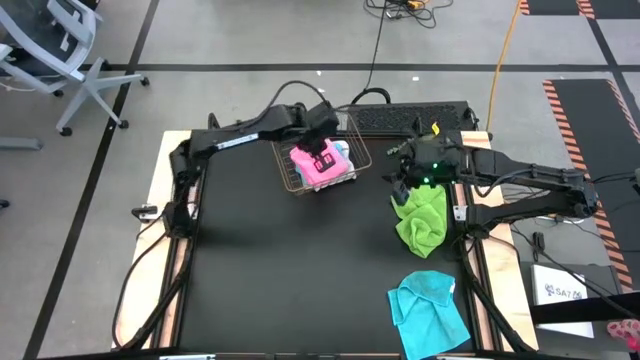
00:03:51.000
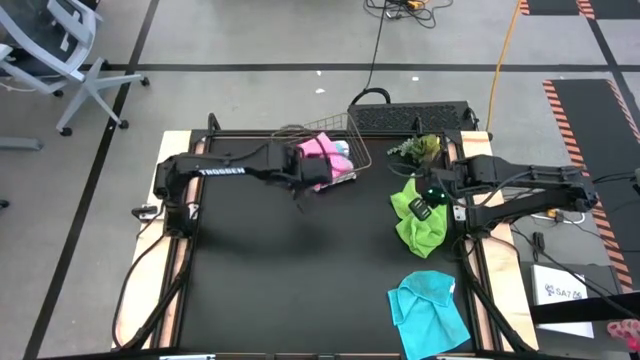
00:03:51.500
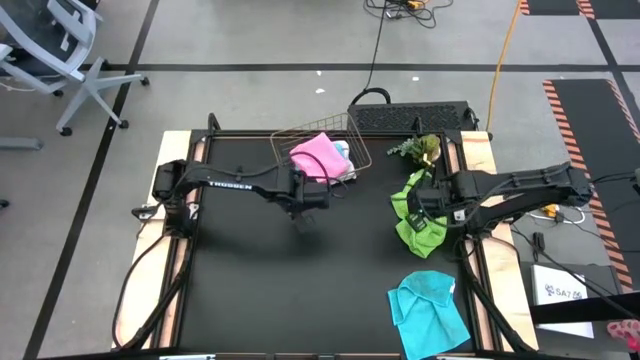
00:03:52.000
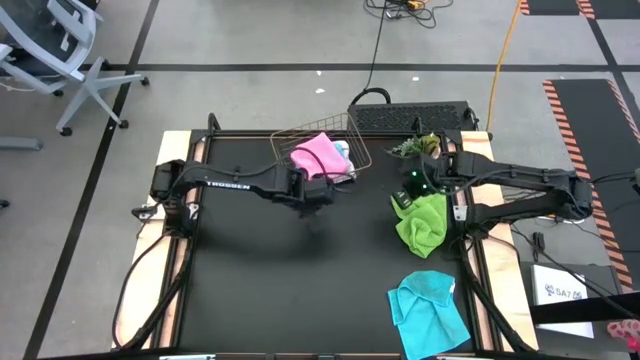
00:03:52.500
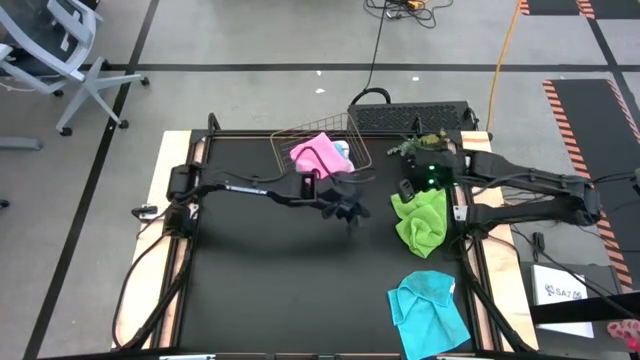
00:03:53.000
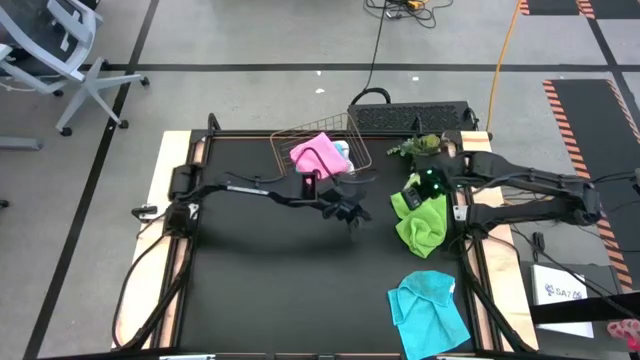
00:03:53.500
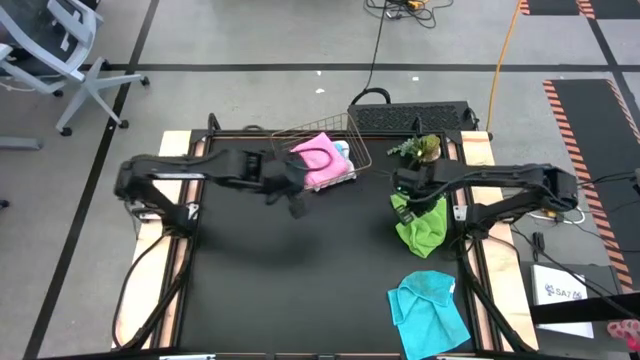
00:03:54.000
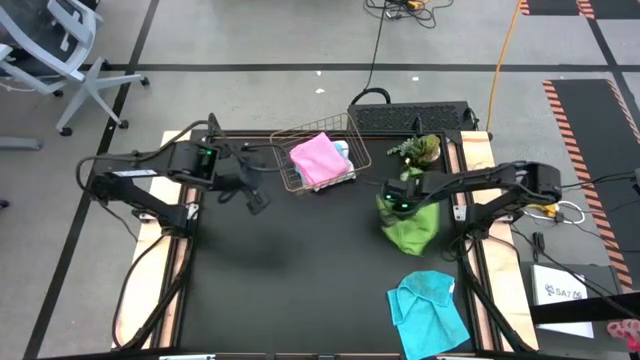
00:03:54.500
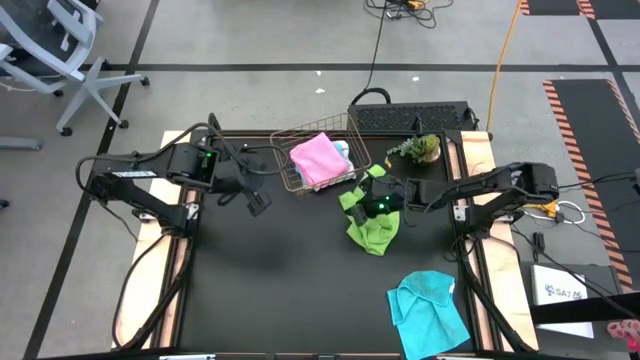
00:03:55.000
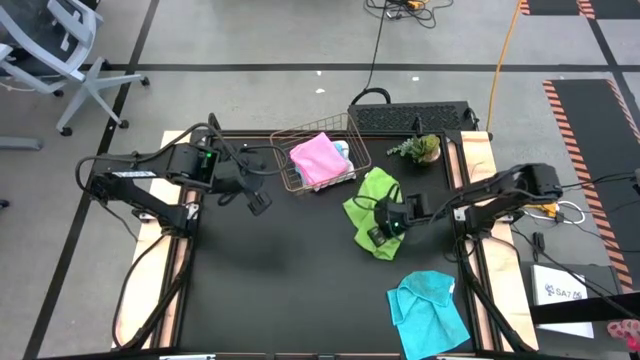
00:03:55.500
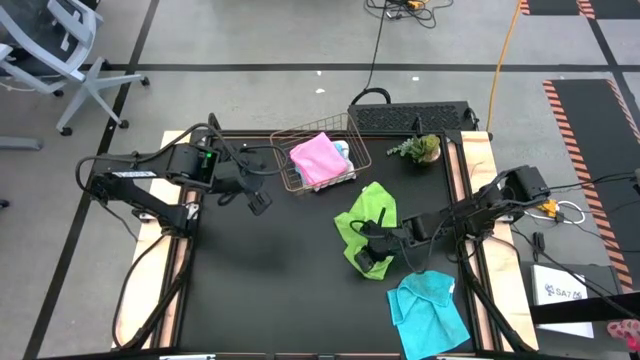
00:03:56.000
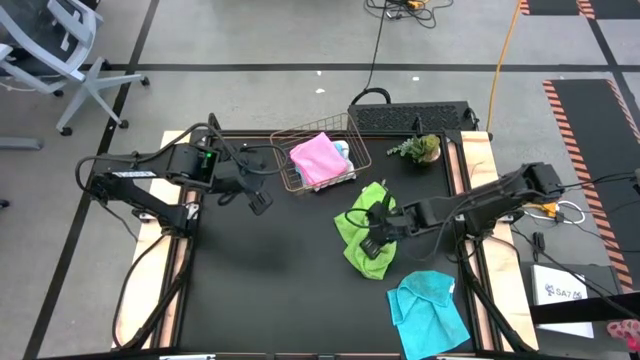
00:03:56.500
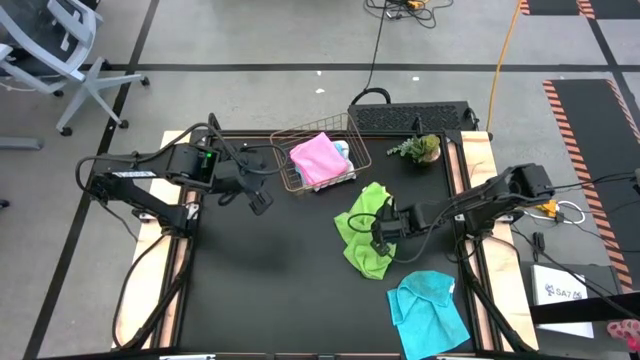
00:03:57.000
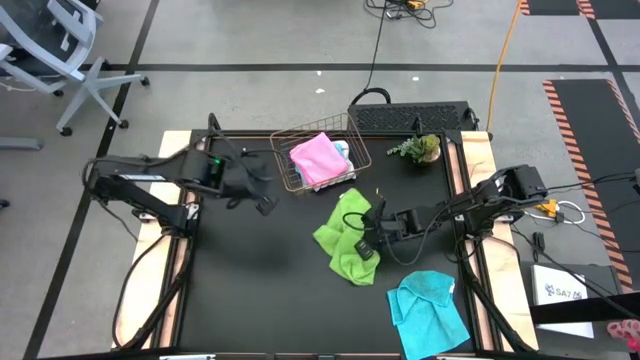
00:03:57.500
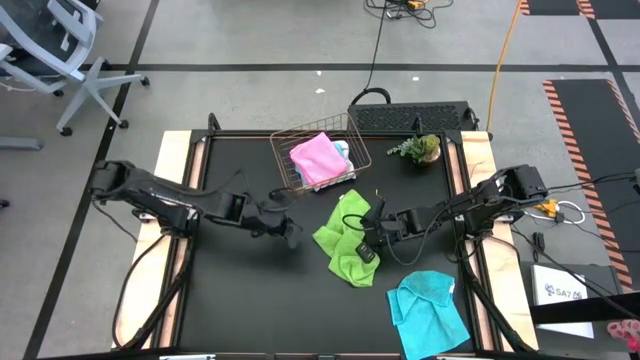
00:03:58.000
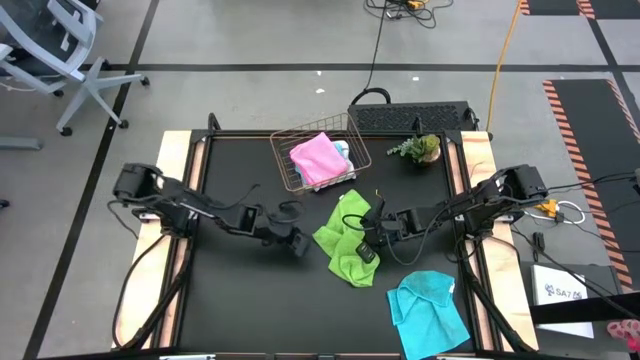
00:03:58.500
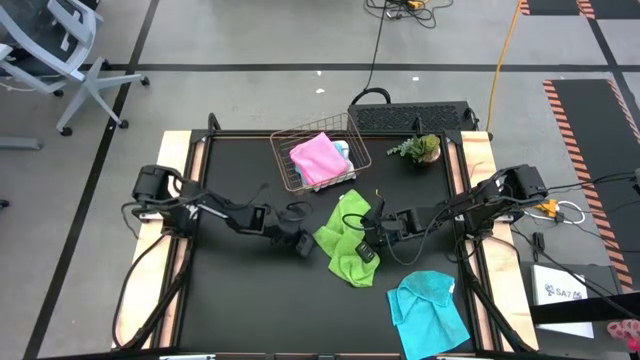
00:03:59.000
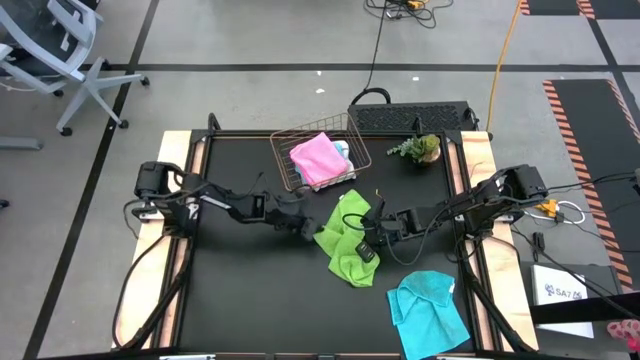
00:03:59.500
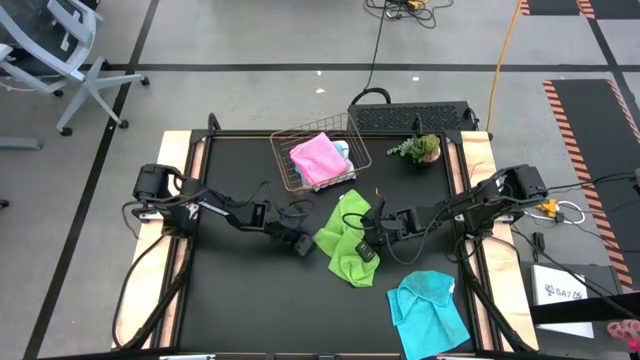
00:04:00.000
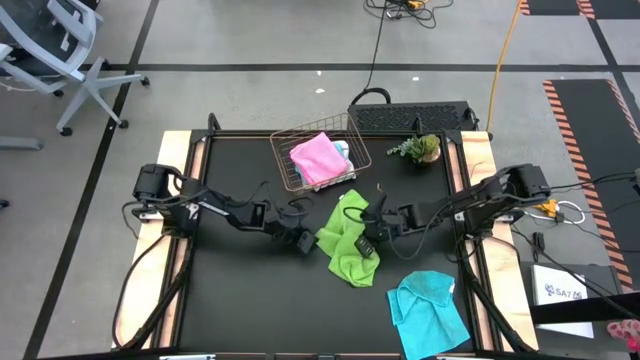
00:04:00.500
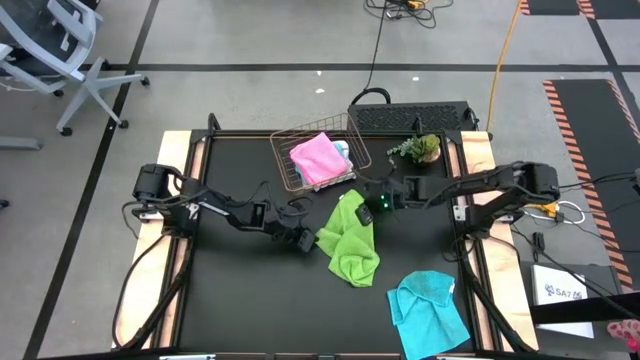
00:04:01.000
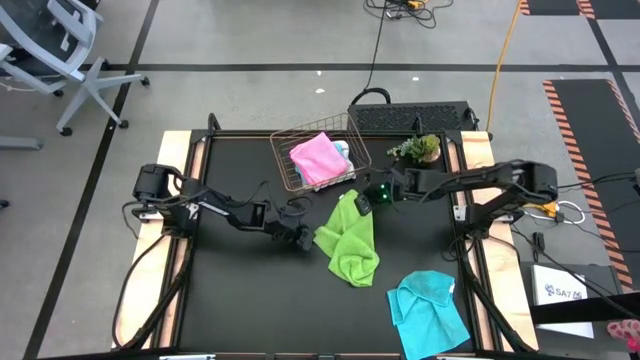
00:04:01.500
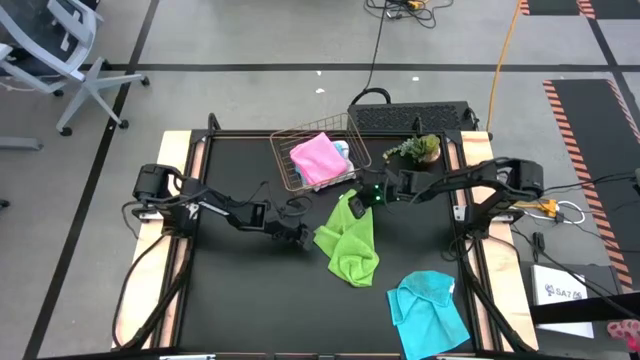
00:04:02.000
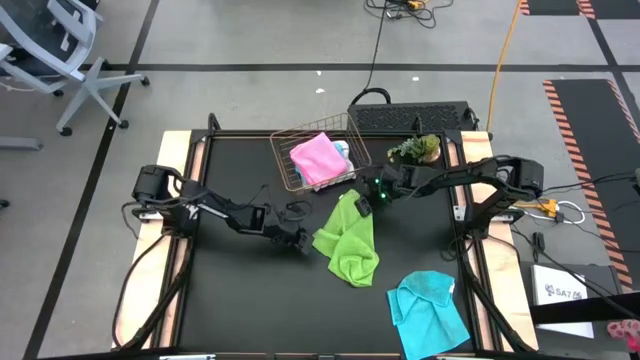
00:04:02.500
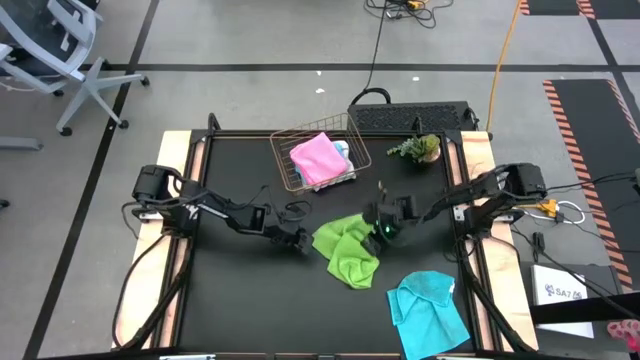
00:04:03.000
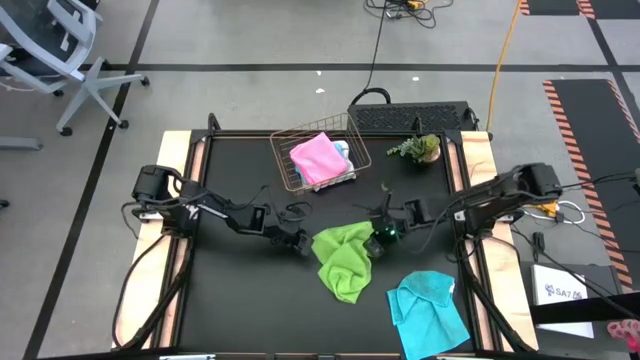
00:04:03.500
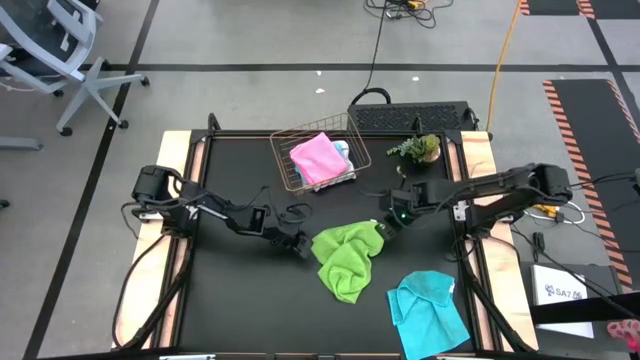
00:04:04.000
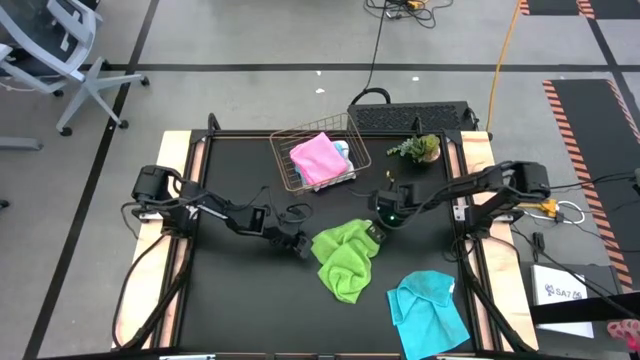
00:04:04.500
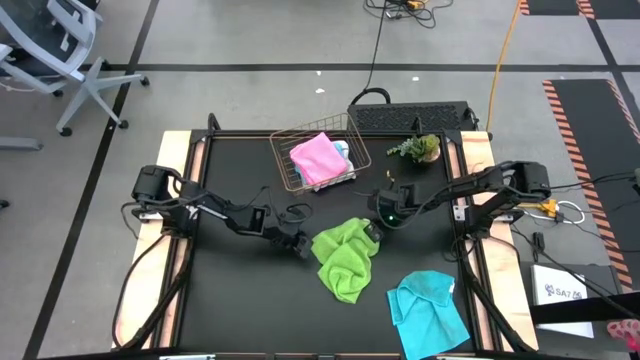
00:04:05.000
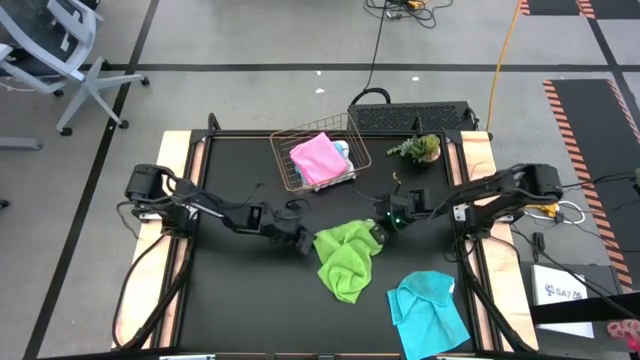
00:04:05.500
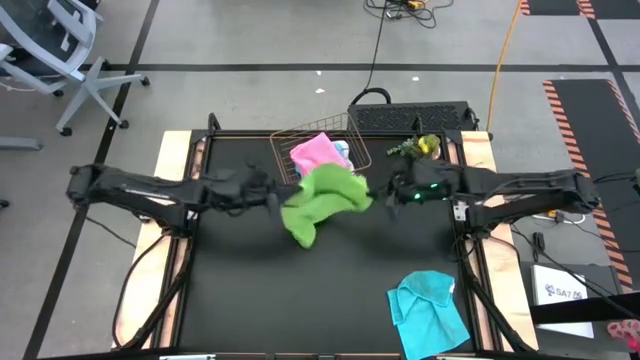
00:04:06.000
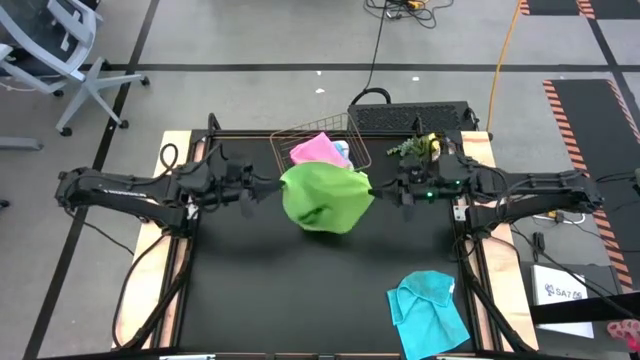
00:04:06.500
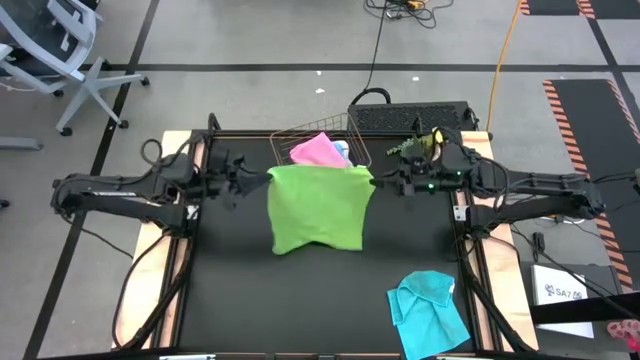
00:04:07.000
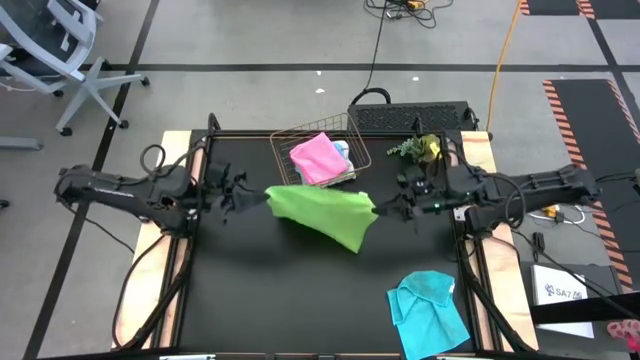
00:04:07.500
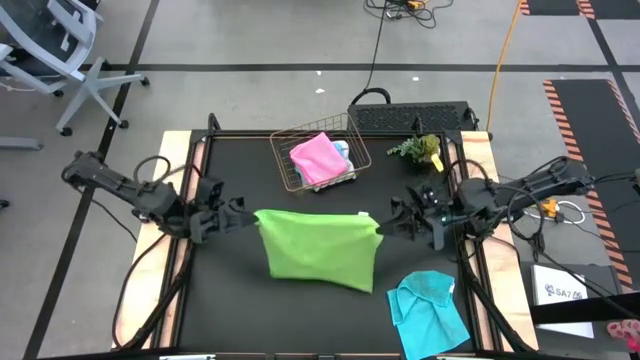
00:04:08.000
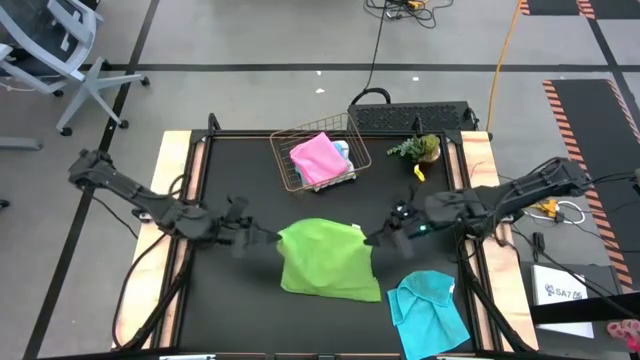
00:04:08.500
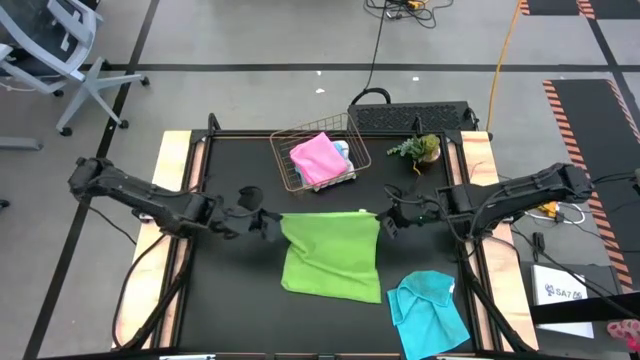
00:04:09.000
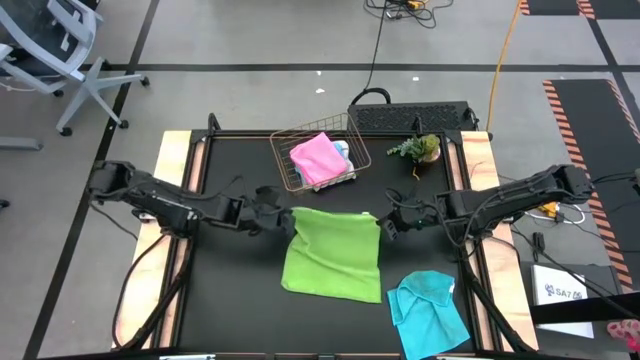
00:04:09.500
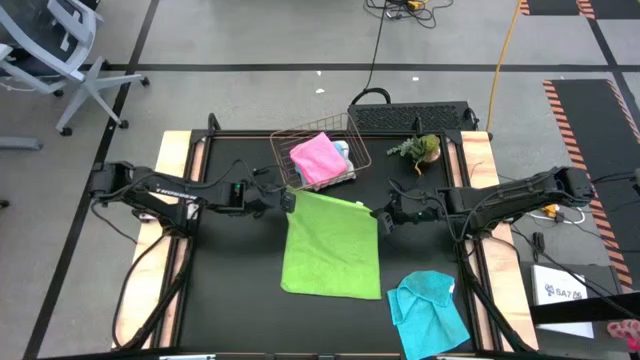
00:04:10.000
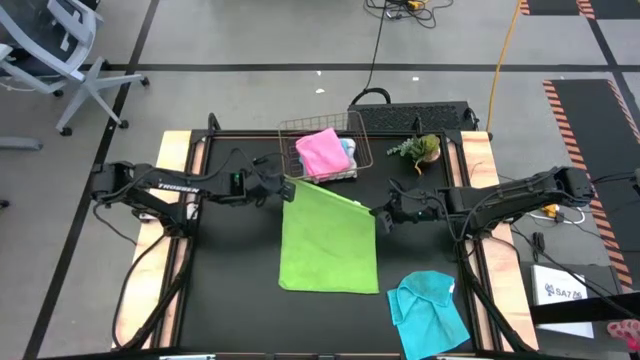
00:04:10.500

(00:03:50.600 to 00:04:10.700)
Task: Fold microfiber towels
Fold the green microfiber cloth

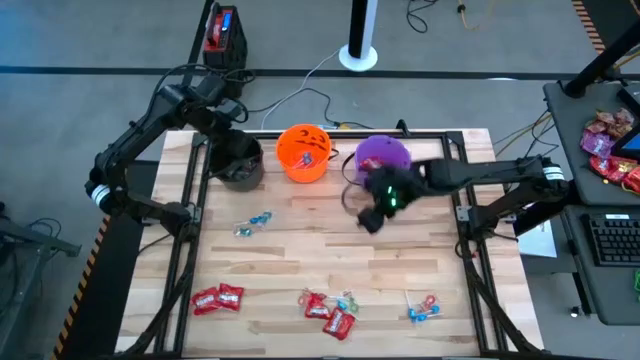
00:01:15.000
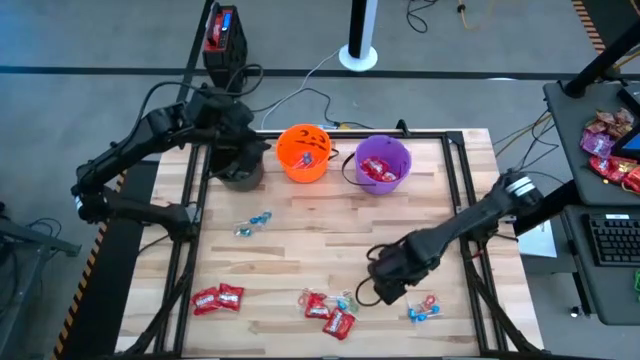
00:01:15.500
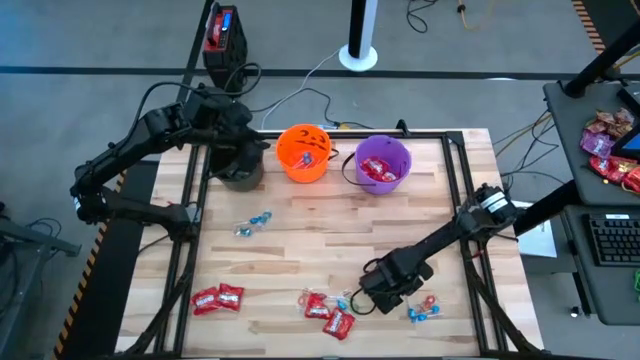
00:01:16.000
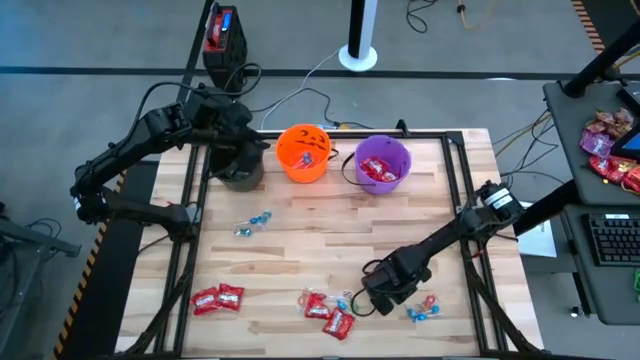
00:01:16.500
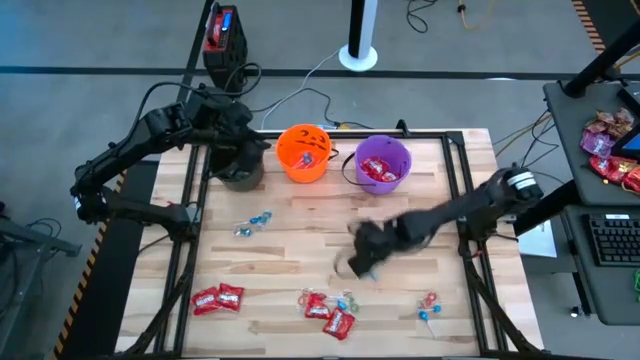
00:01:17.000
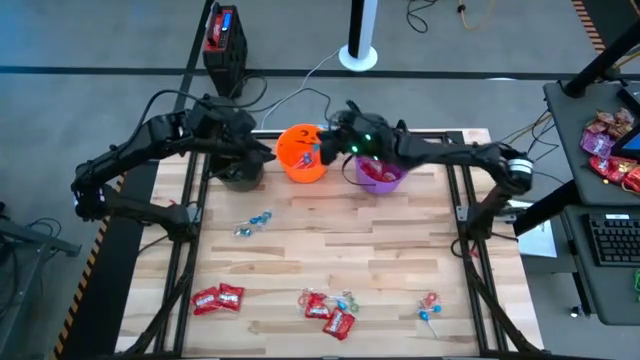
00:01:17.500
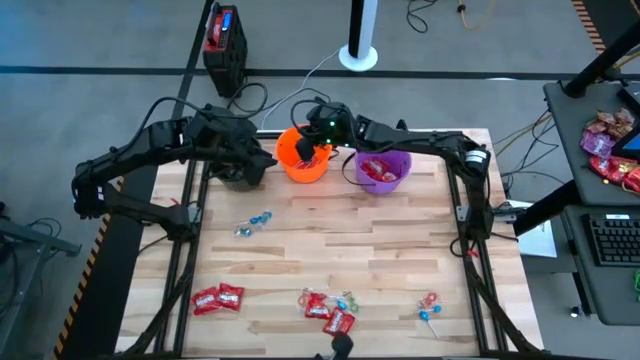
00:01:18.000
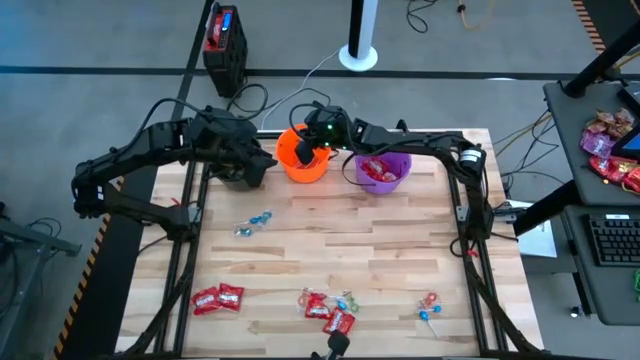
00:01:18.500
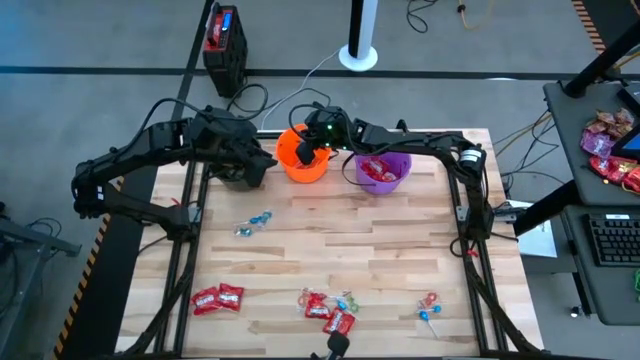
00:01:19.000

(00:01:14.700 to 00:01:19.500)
Task: Sort candy by brand, put in halloween buckets
Put the blue candy into the orange bucket
